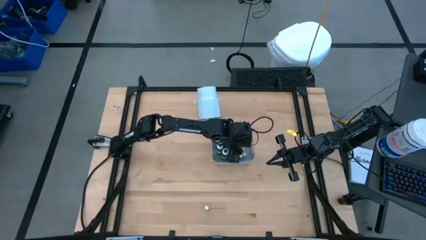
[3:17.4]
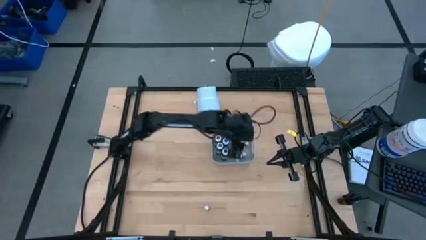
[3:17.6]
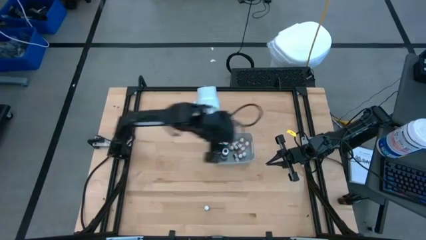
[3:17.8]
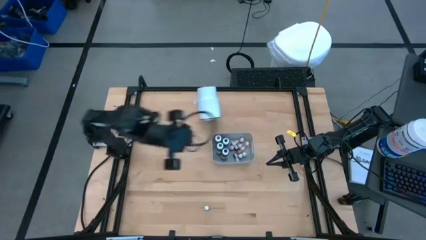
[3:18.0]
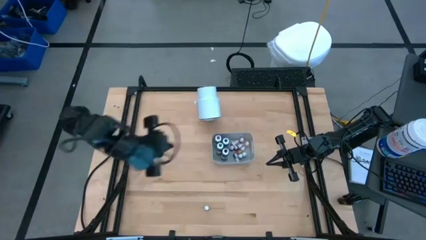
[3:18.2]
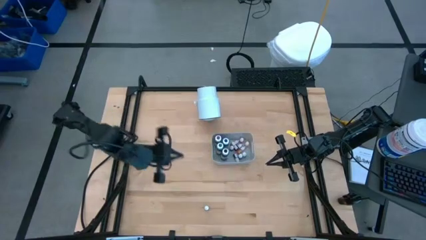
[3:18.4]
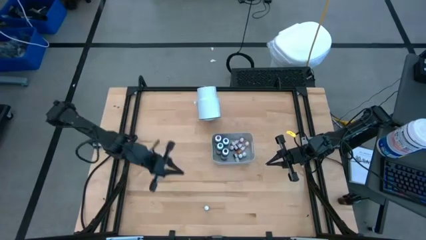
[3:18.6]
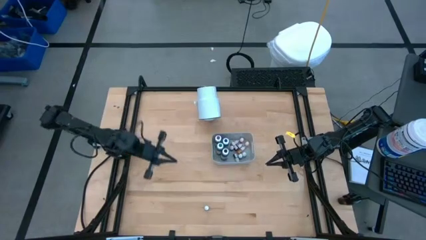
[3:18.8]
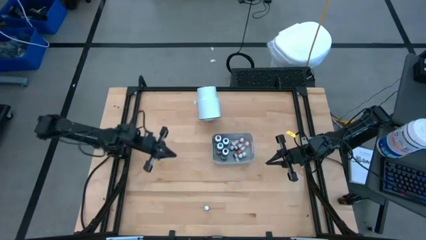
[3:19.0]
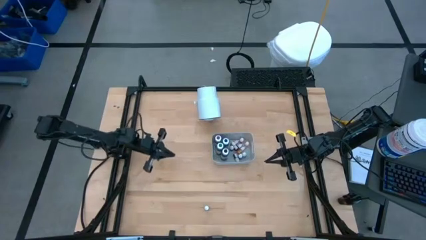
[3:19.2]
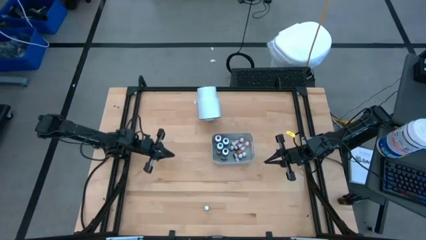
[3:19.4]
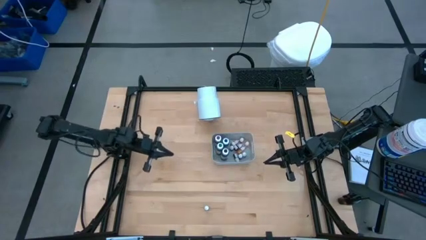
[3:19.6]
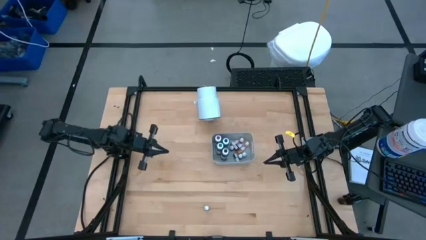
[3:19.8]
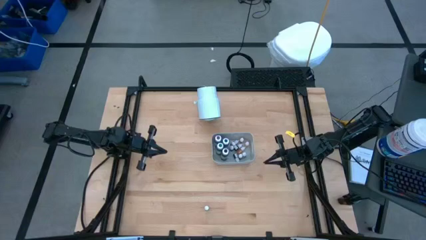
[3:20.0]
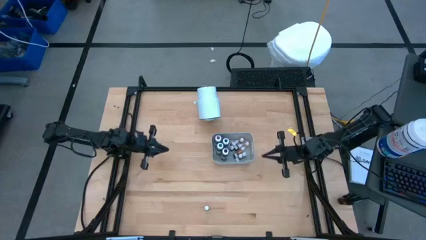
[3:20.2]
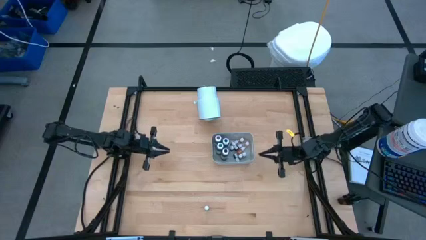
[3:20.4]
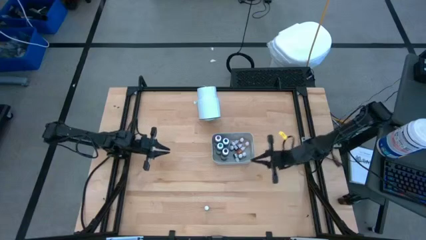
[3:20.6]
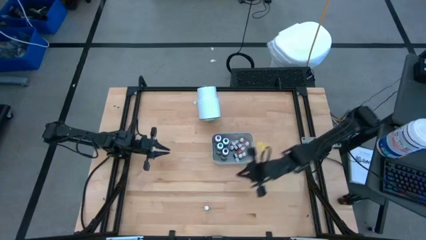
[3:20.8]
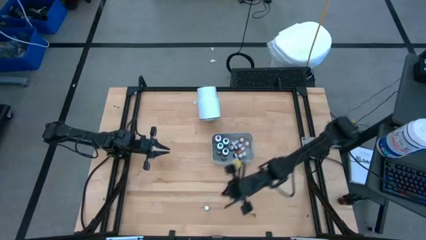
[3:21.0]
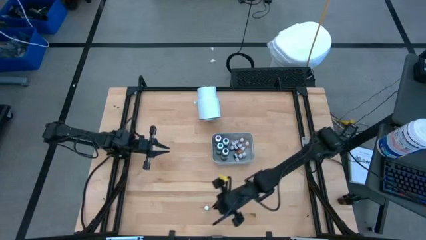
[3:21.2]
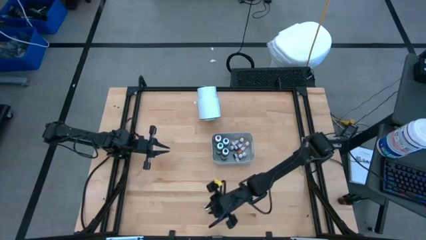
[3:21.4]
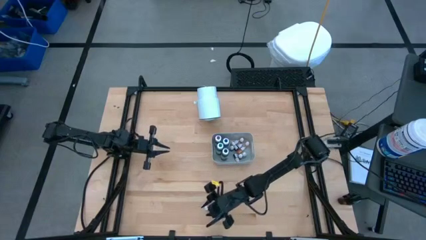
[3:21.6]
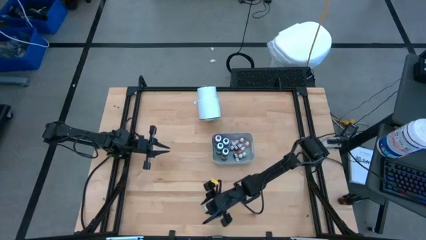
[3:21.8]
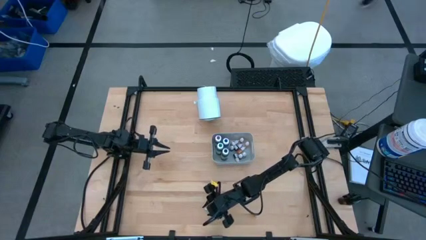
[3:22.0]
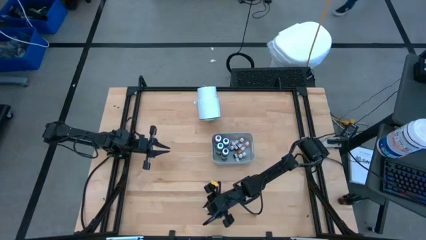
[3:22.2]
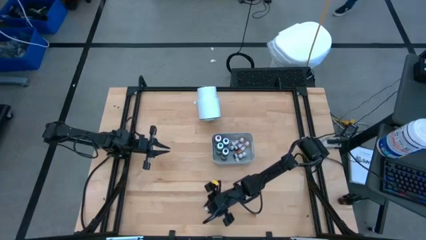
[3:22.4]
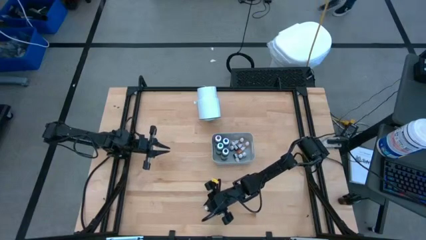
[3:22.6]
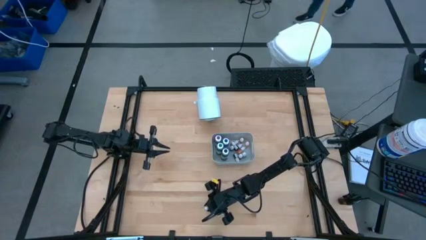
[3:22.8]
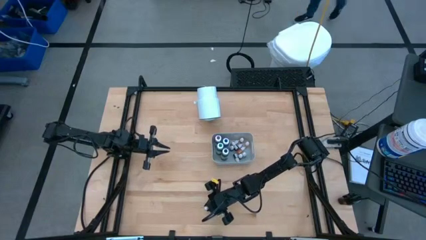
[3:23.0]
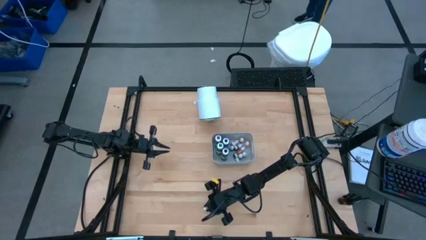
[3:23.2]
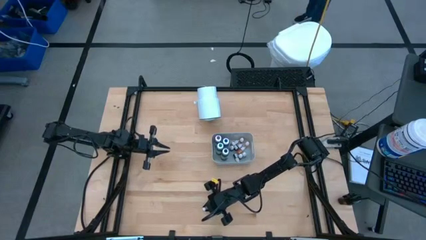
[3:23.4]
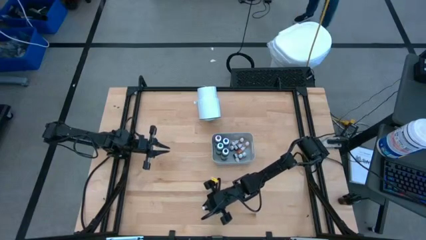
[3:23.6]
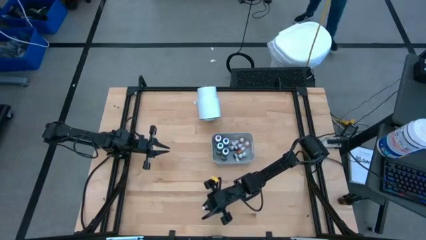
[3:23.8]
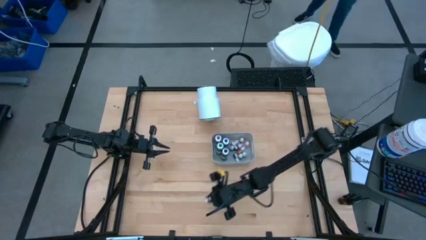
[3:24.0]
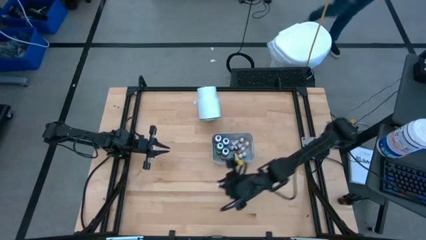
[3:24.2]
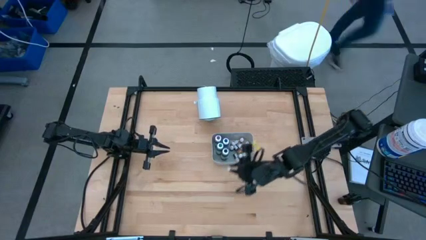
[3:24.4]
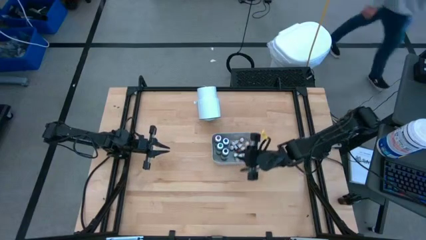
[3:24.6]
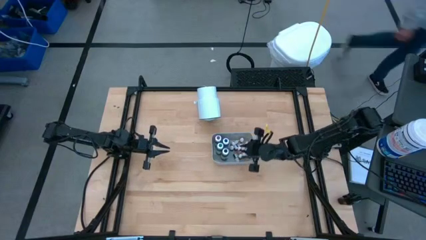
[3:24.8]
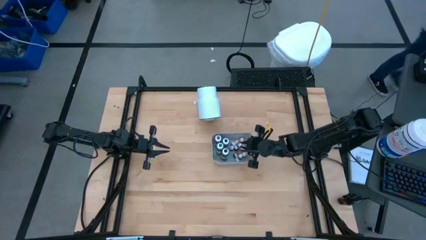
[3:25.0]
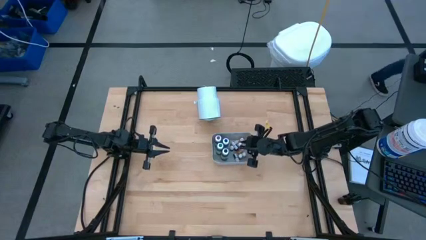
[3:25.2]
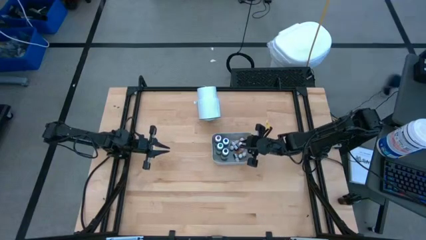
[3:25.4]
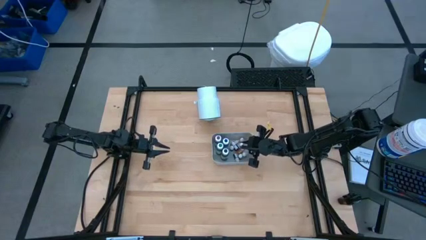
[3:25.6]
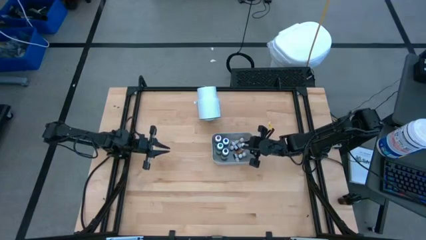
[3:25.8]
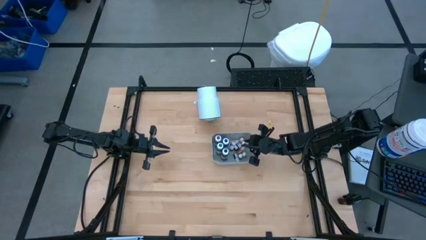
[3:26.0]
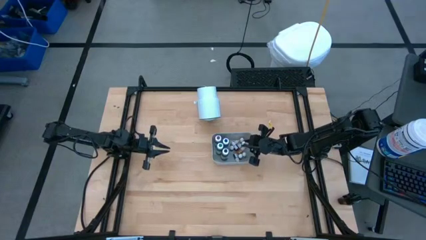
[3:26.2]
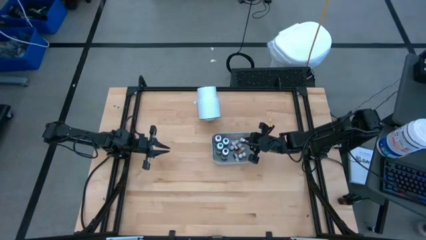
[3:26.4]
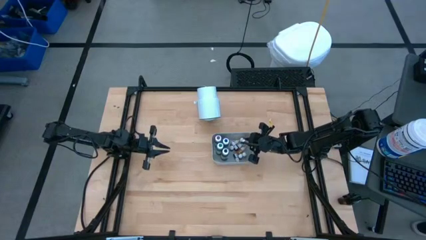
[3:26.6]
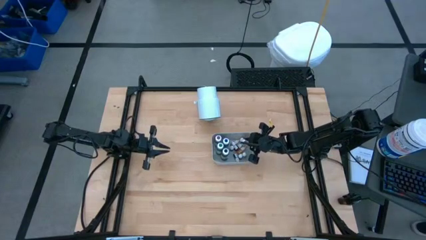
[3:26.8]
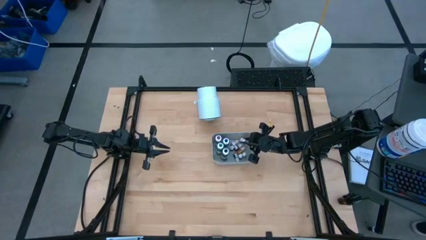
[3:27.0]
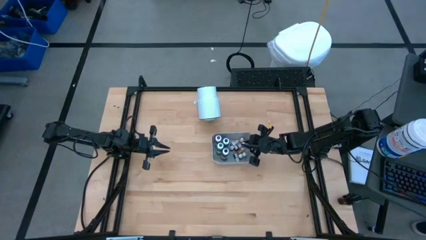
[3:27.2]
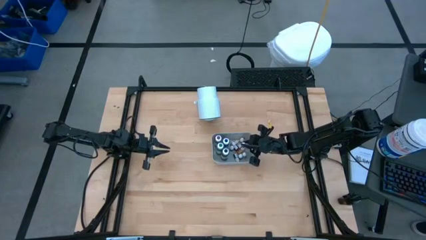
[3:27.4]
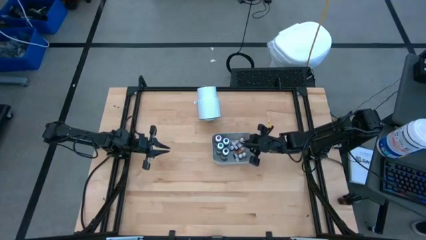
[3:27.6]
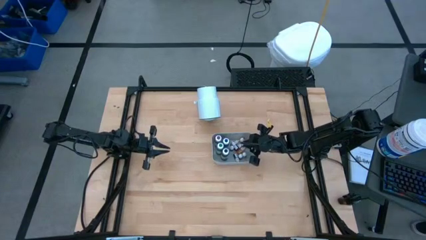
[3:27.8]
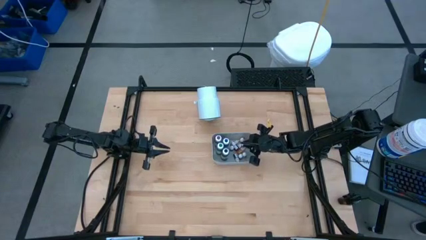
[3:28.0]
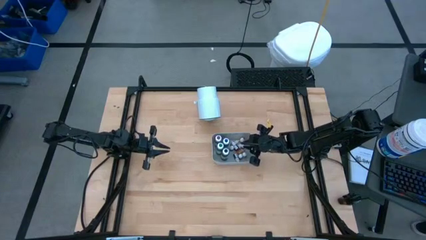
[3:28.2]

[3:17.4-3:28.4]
Task: Pick & Place food coloring
Put the green food coloring bottle into the gray bin

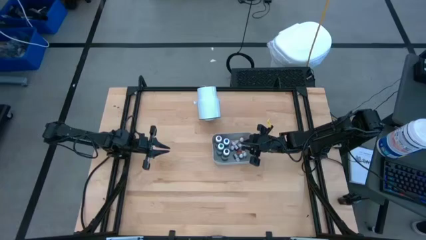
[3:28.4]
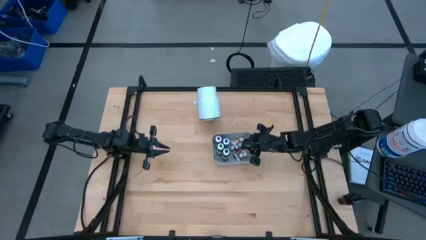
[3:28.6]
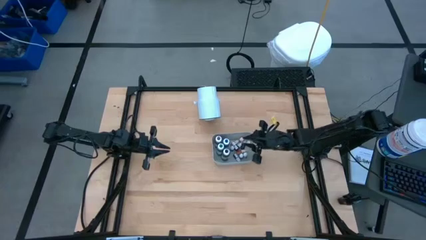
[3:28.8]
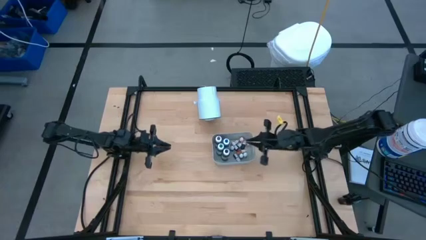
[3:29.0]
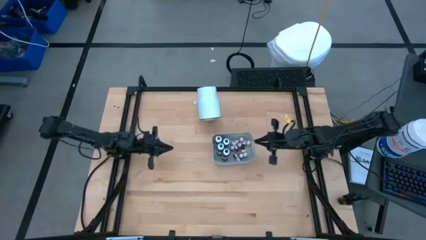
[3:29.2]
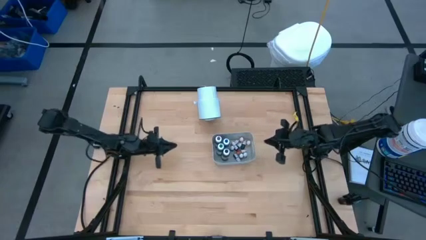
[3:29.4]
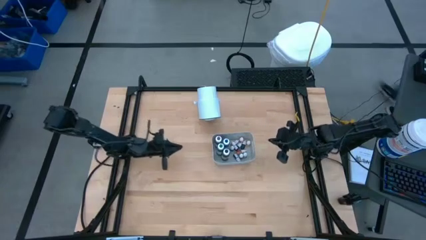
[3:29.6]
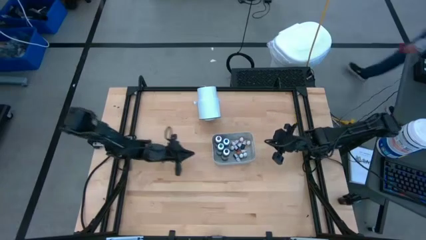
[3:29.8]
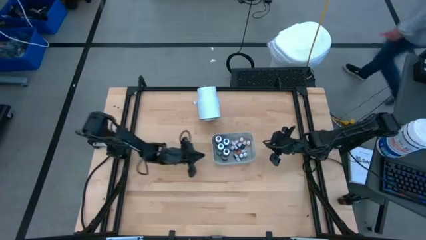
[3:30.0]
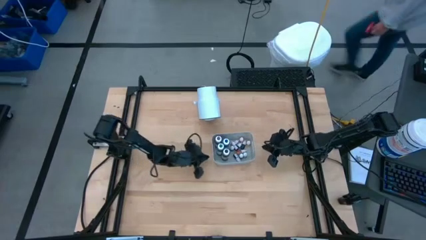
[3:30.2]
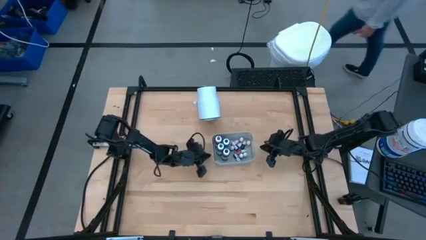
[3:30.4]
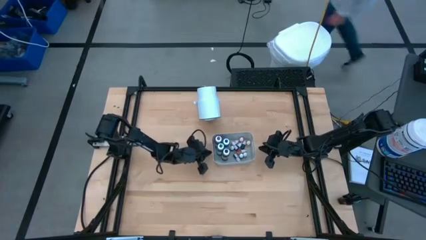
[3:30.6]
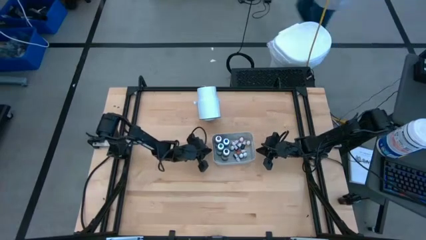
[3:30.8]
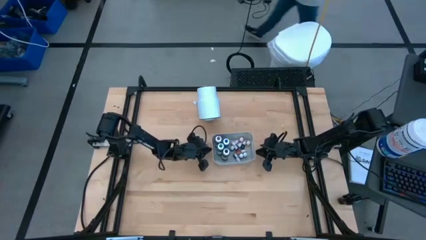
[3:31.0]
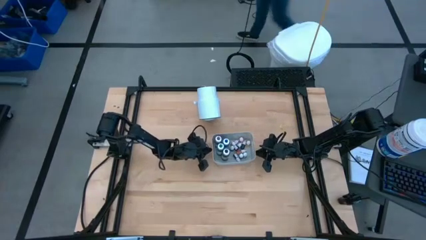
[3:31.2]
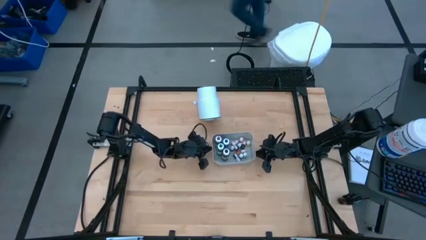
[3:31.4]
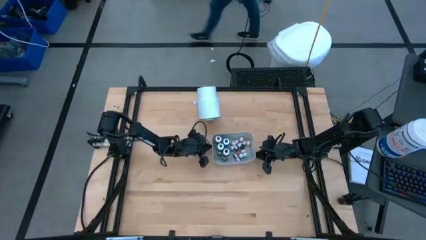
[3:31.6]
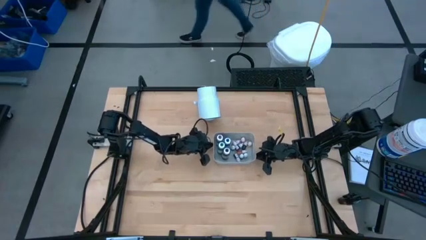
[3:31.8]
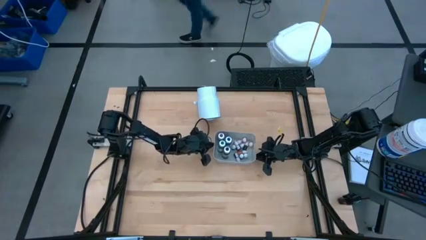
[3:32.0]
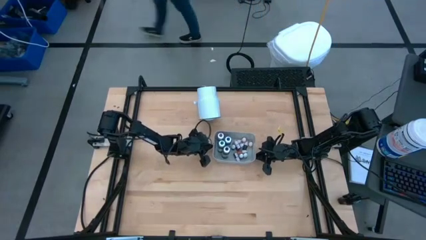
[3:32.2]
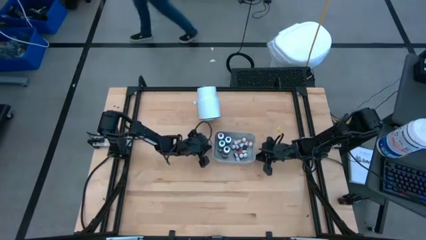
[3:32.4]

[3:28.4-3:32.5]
Adjust the gray bin

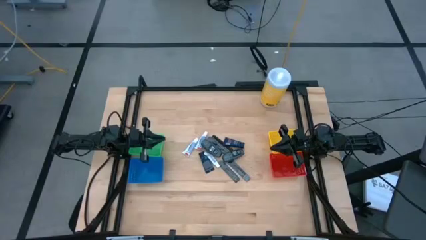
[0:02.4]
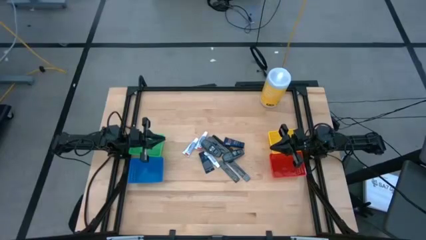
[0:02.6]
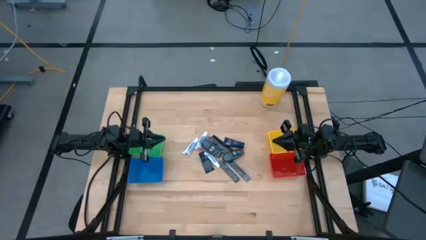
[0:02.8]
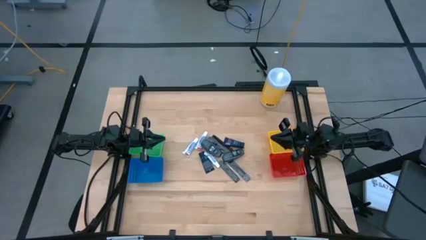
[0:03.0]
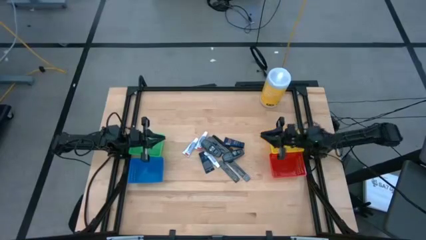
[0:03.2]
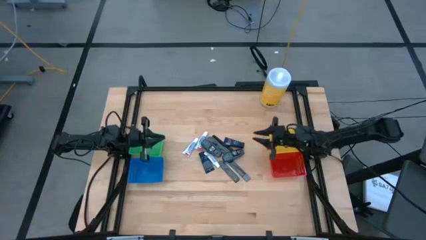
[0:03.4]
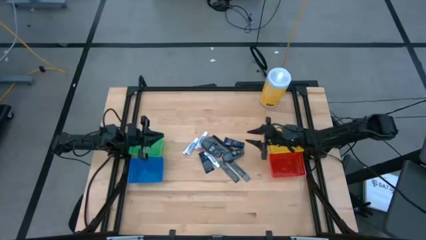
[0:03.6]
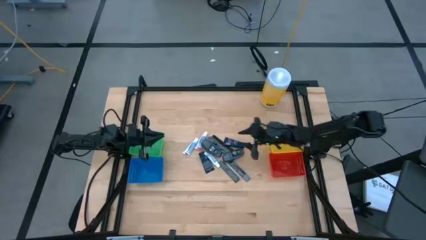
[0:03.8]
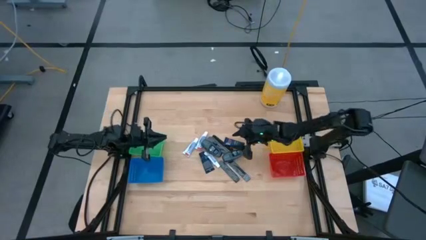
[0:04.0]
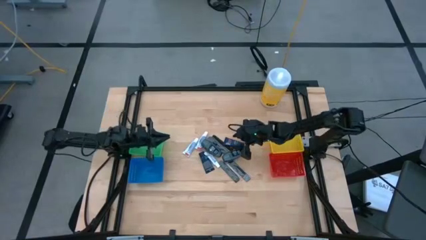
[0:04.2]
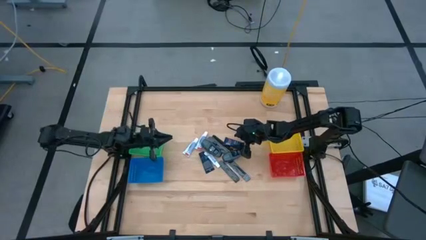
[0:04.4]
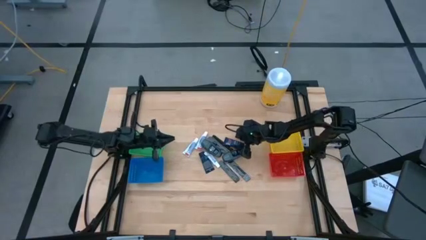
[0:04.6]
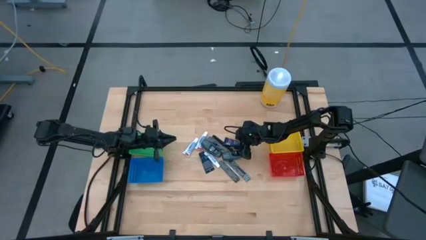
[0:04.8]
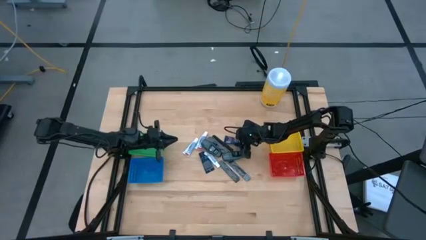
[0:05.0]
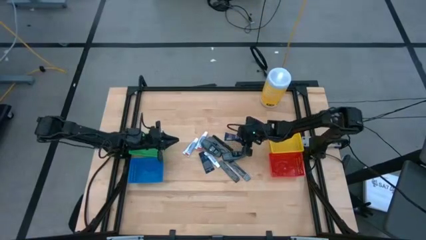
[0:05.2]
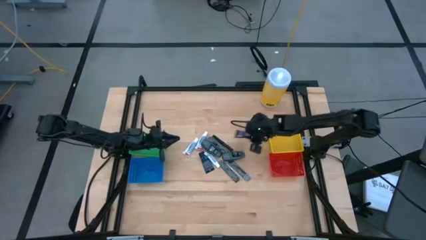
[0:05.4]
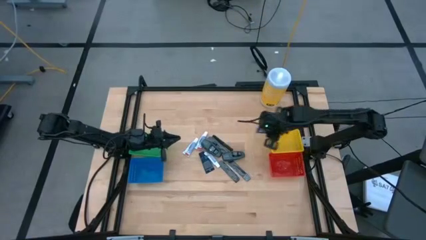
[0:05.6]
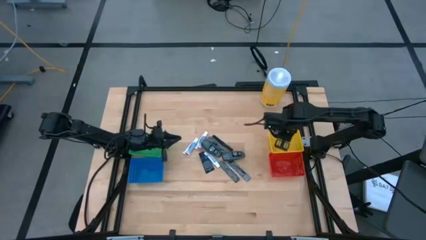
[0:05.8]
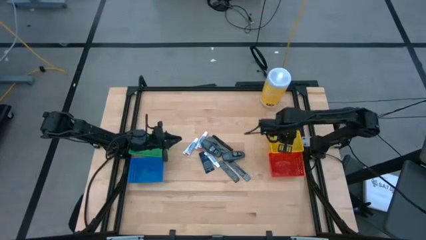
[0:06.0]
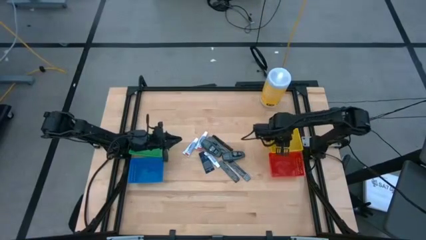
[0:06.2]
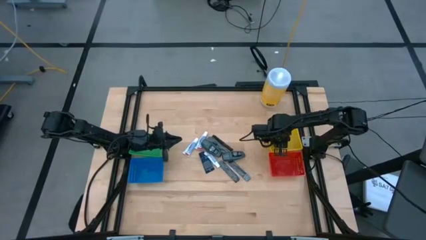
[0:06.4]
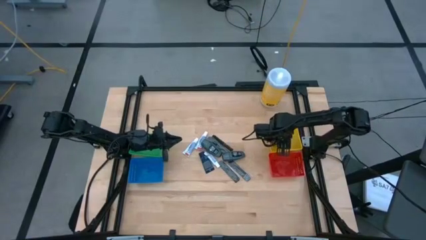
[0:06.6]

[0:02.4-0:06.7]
Task: Pick & Place Travel size toiletries
Put the blue shave cream into the yellow bin
